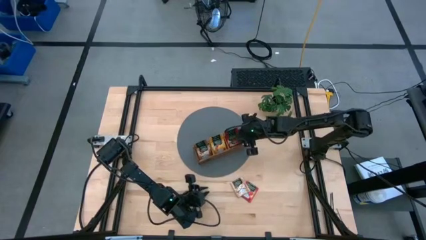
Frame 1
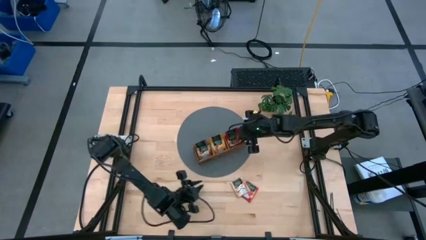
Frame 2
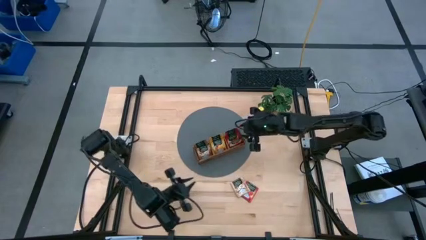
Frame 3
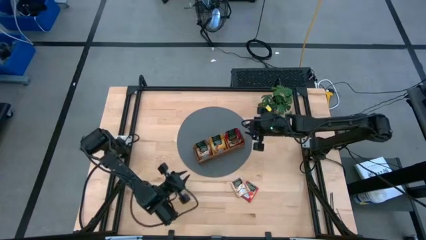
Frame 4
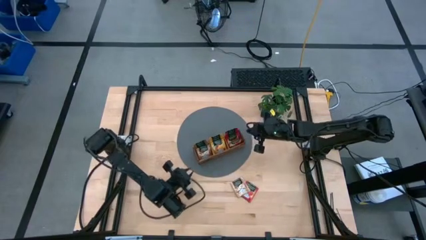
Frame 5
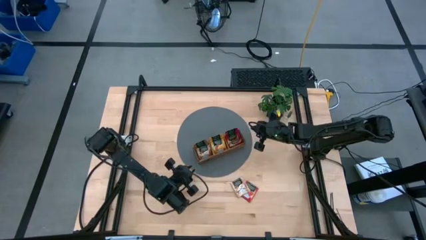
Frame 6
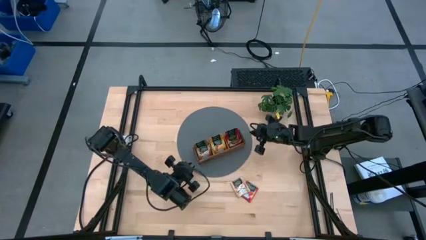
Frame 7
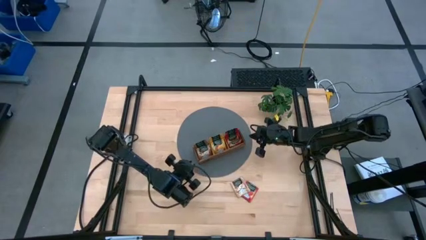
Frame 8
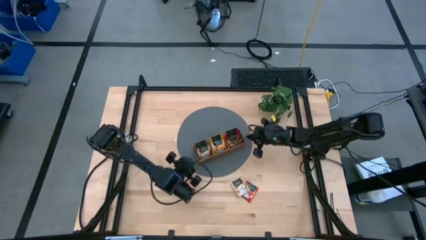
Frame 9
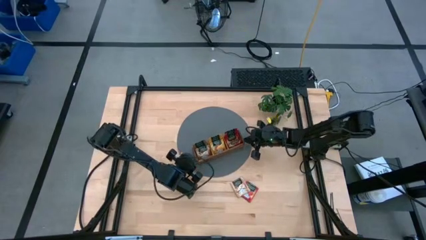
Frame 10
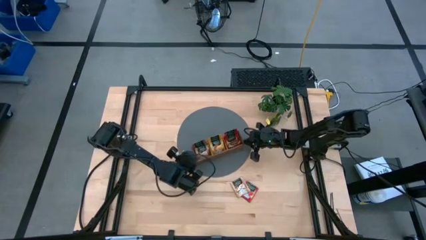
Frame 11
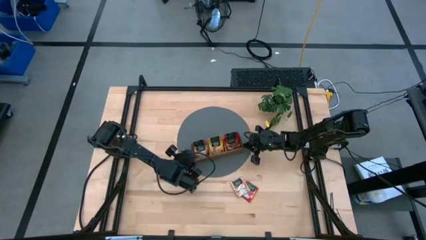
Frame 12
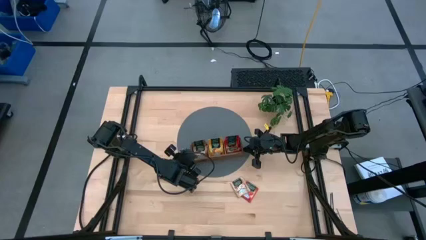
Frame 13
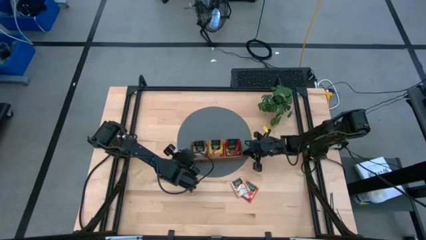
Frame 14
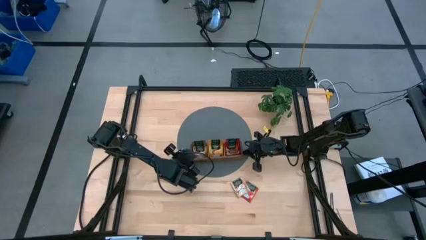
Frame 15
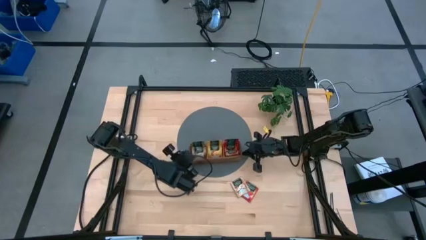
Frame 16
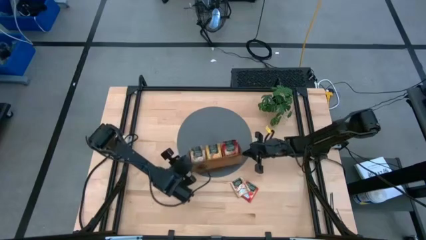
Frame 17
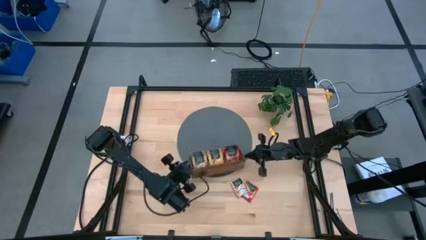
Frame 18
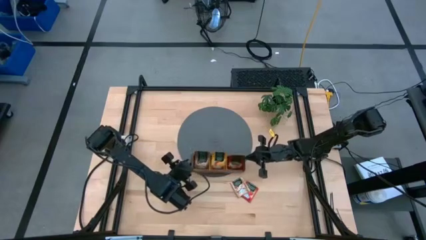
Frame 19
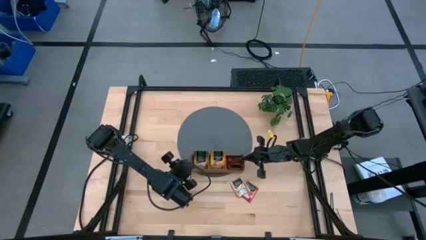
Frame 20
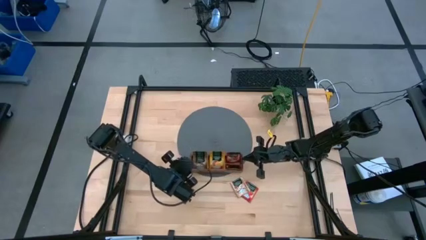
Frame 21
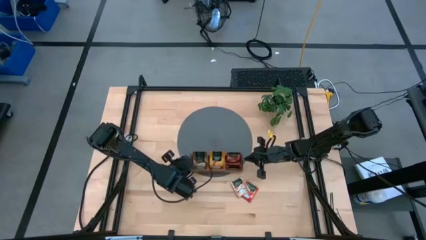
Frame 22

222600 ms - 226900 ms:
Task: Pick & Place Tea
Adjust the wooden organizer

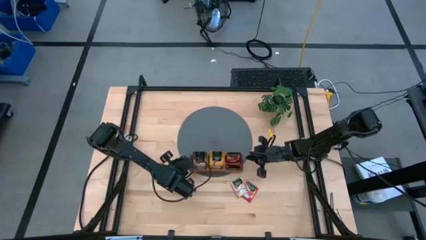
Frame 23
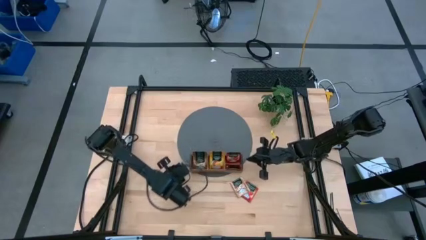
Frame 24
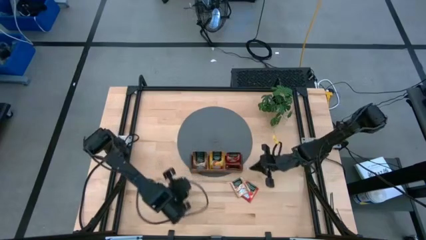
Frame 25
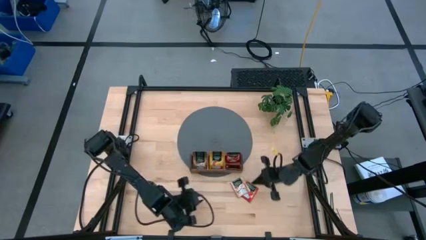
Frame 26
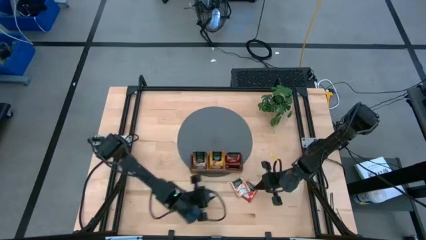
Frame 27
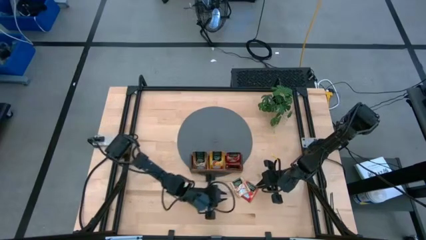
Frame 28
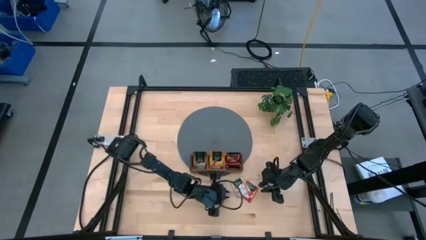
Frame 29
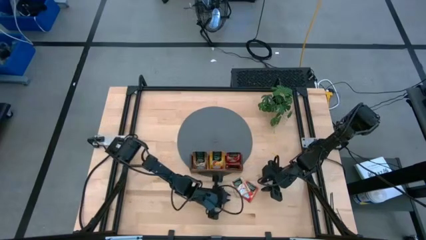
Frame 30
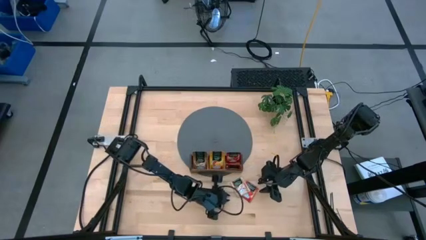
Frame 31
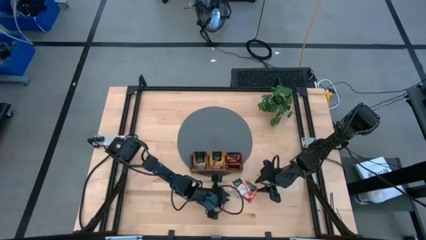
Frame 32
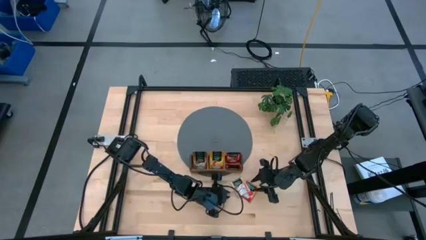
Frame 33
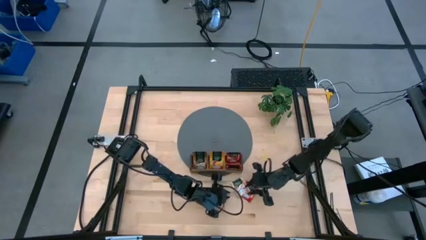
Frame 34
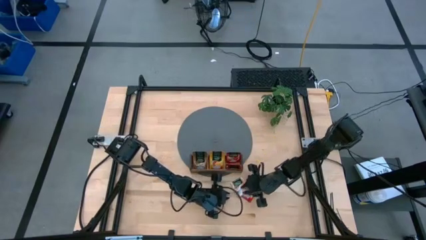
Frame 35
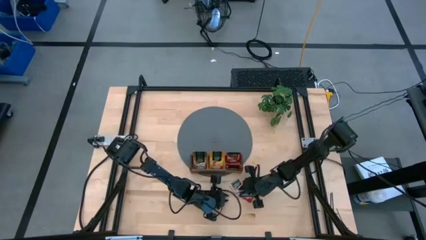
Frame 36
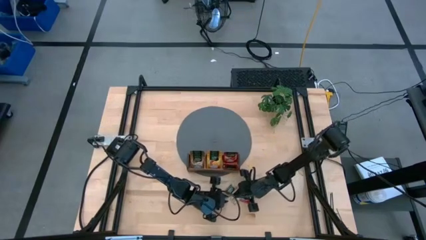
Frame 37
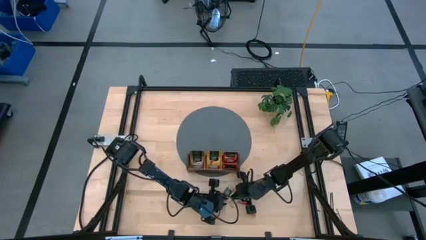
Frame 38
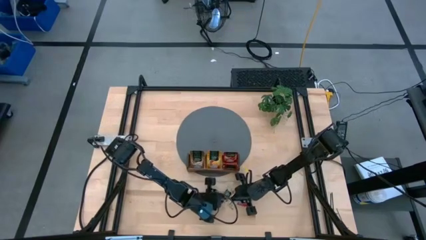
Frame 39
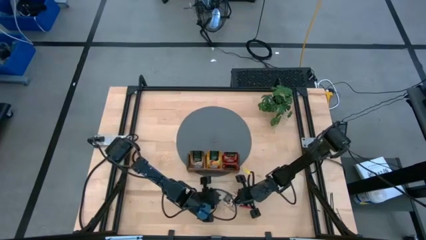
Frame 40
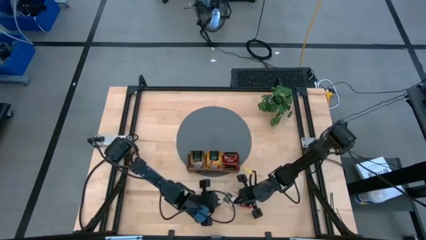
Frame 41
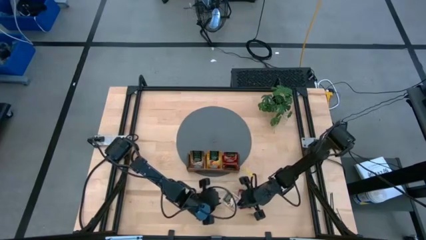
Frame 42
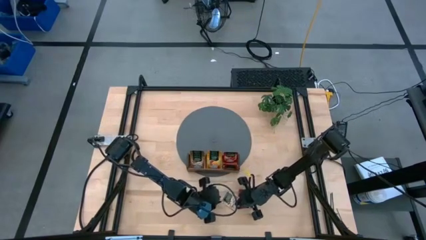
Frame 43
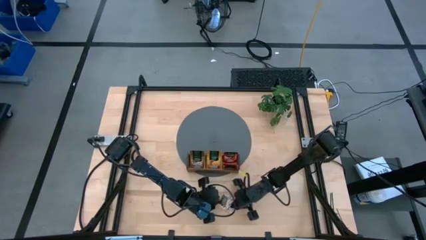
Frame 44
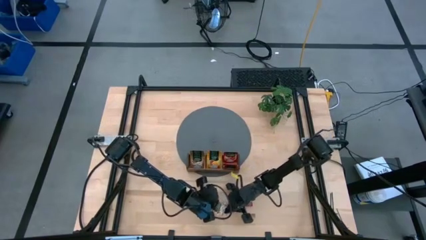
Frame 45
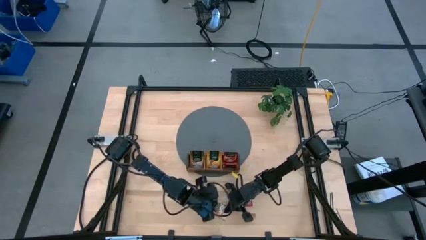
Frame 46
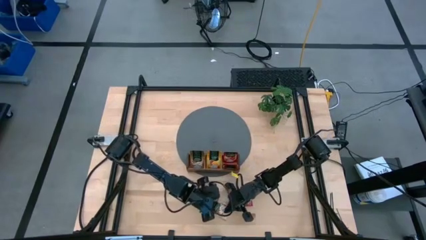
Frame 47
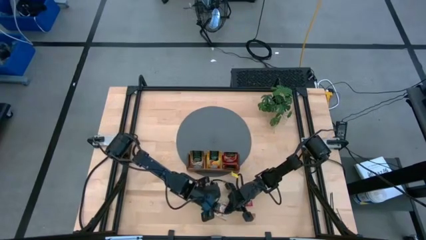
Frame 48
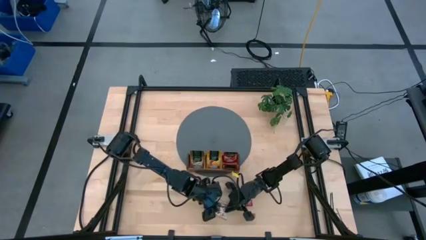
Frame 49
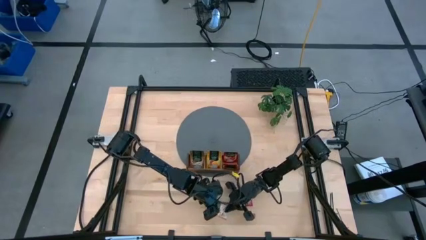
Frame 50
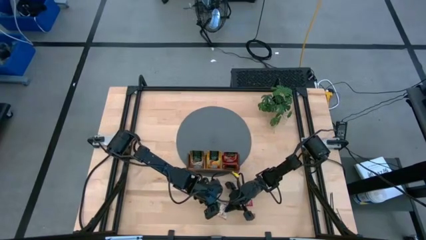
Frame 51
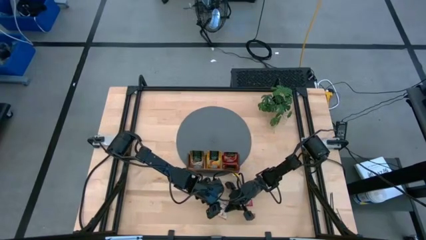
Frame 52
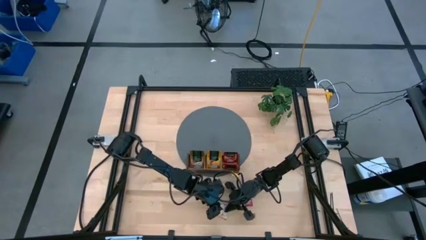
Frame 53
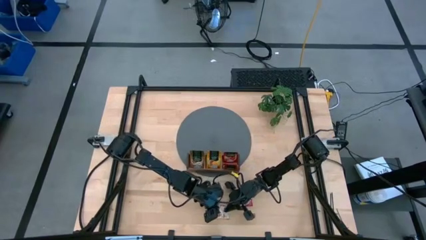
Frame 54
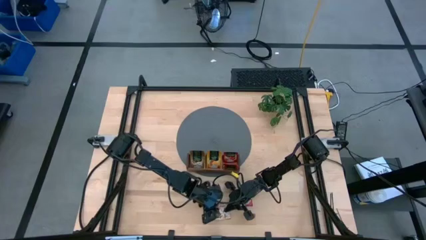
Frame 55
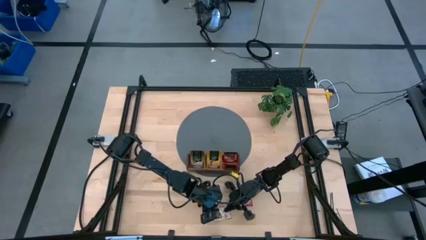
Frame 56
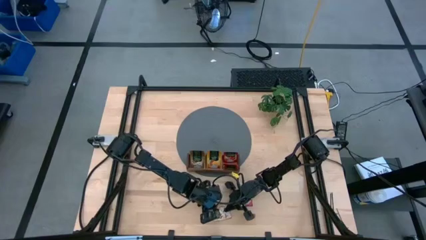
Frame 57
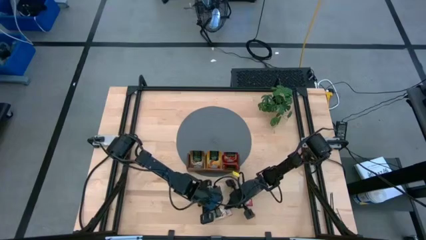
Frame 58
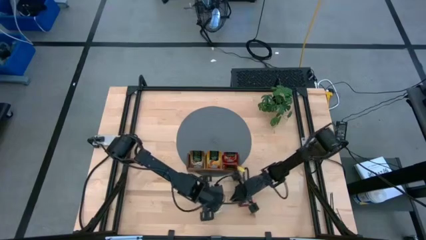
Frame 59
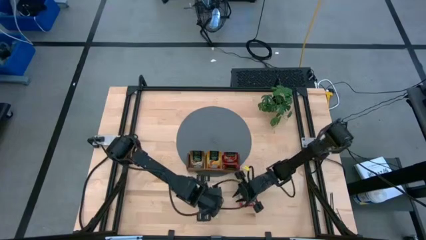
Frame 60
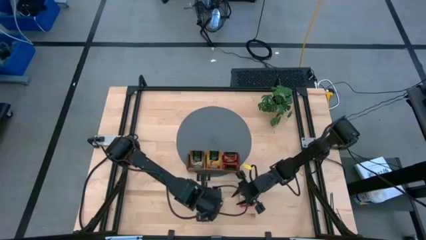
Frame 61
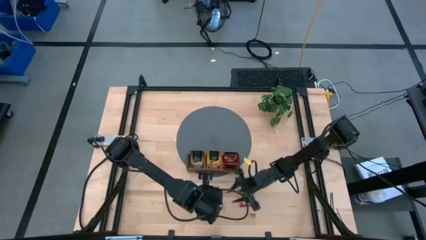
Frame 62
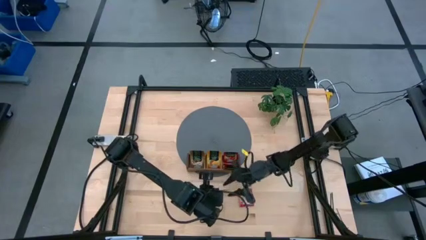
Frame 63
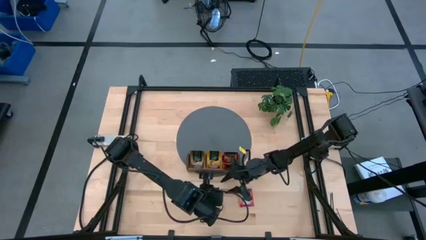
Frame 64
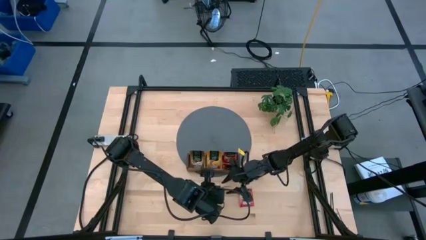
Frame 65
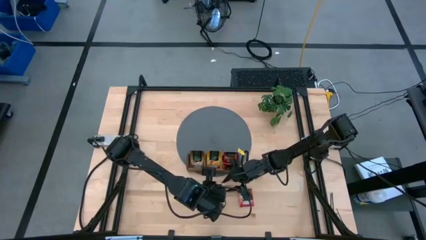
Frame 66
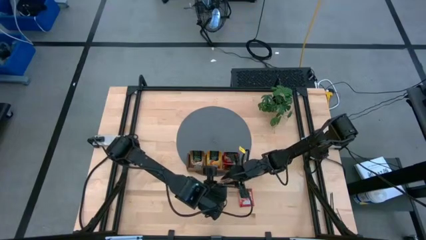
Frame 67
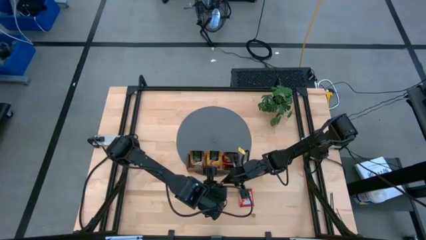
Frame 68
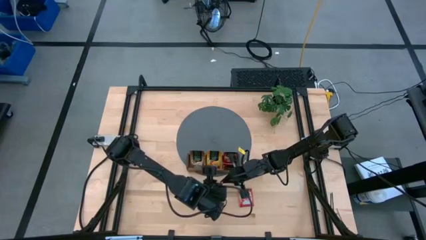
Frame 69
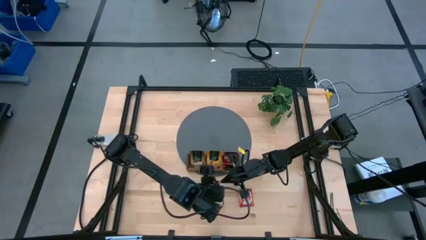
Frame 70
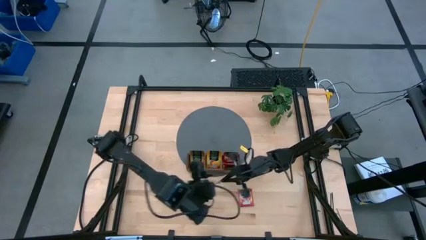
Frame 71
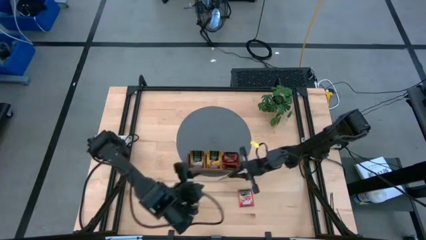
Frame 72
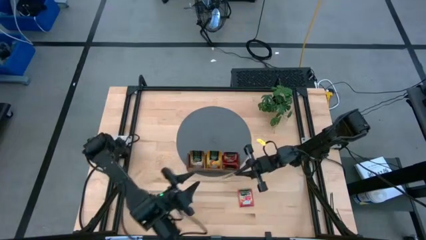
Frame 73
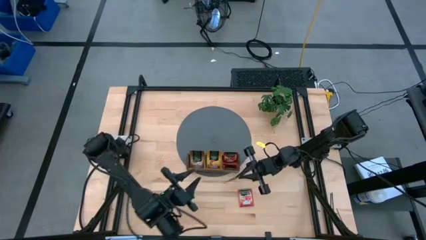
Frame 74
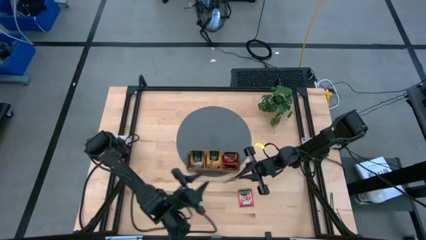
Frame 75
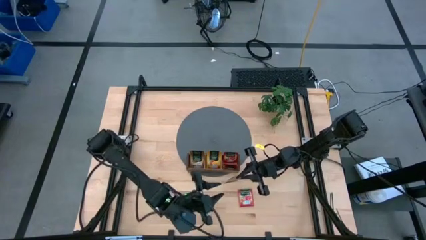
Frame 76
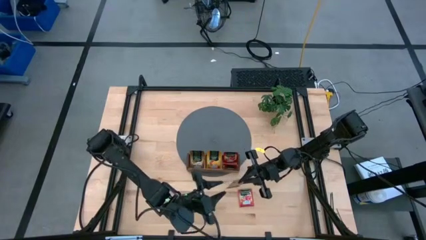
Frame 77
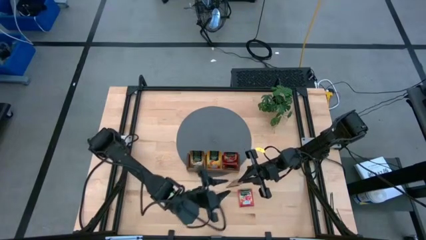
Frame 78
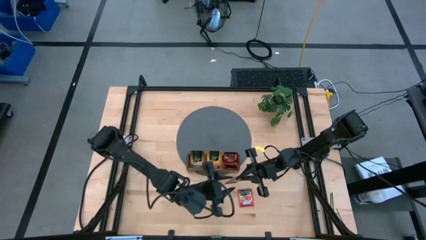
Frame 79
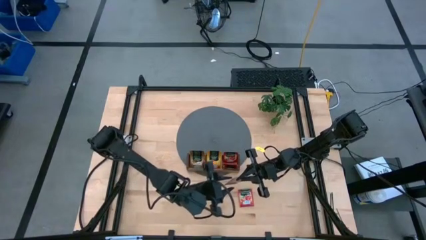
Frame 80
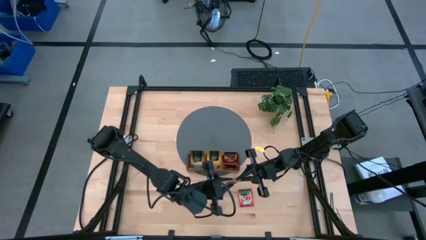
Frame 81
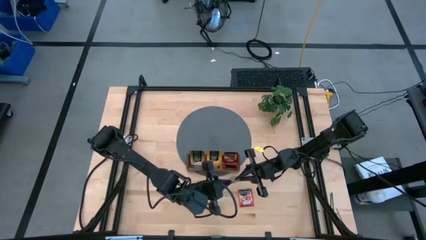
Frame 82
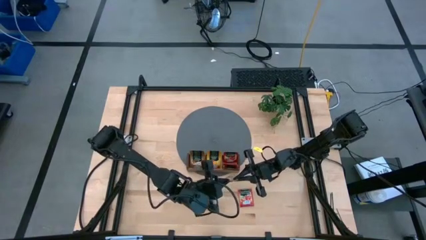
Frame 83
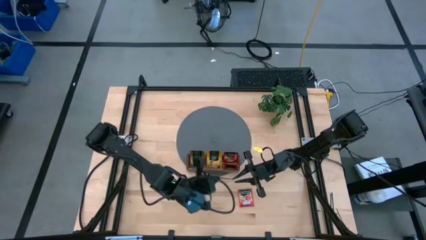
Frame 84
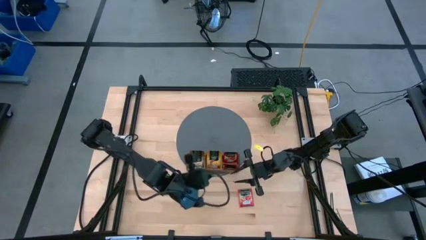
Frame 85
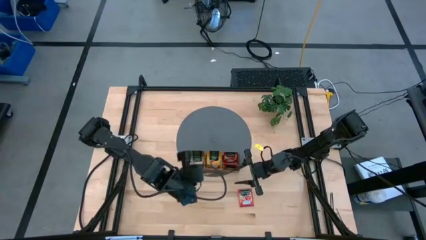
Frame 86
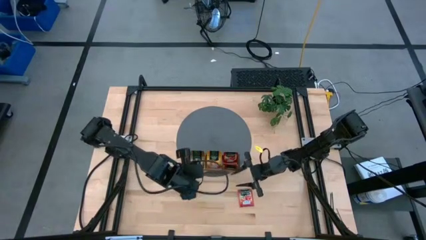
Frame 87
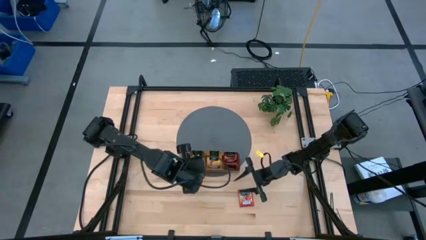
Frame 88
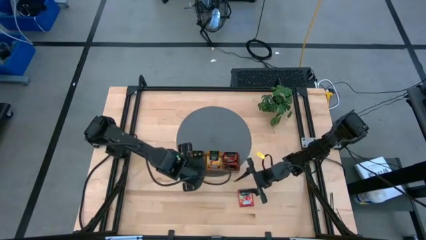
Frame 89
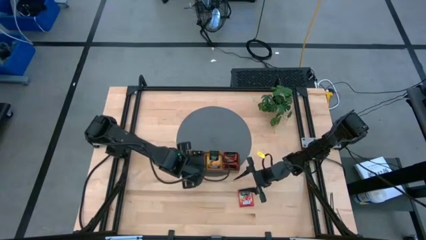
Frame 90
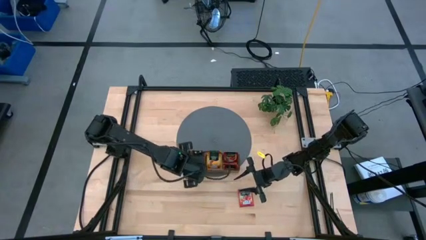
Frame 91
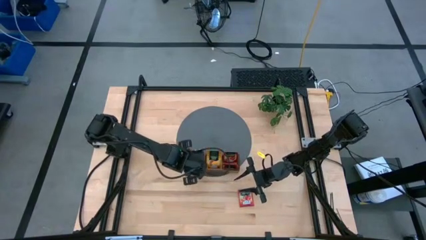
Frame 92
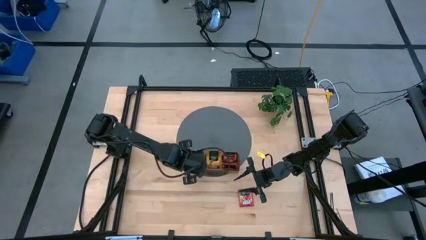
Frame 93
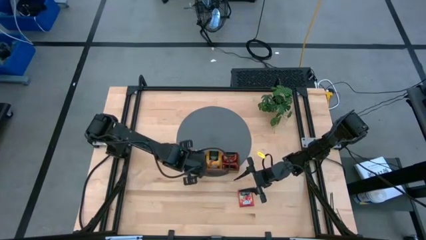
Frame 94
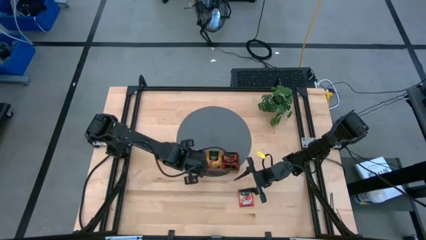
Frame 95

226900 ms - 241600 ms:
Put the brown tea bag into the left section of the wooden organizer
